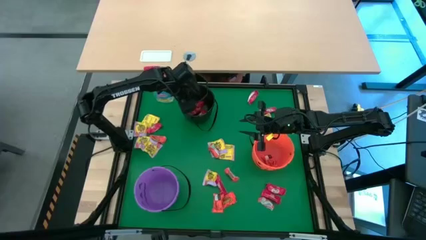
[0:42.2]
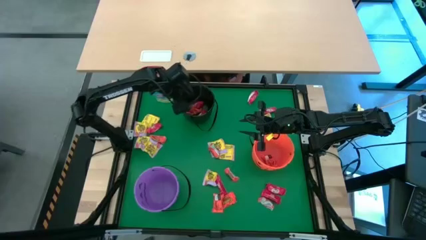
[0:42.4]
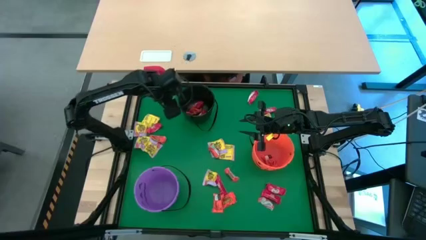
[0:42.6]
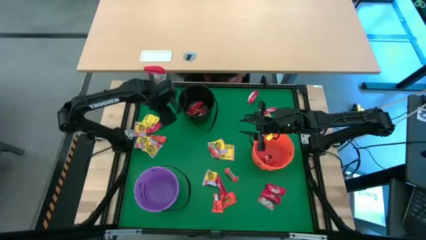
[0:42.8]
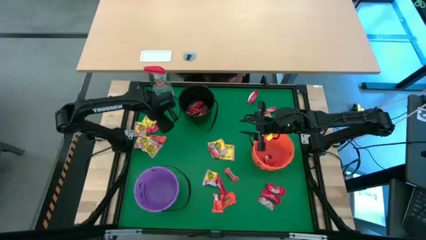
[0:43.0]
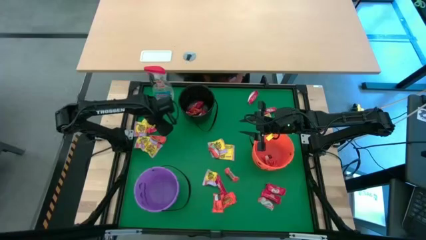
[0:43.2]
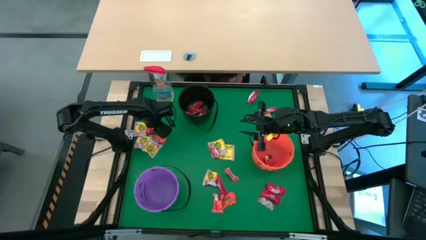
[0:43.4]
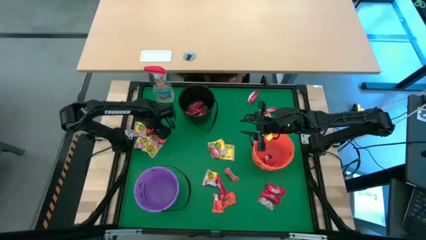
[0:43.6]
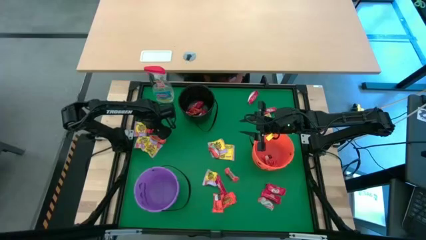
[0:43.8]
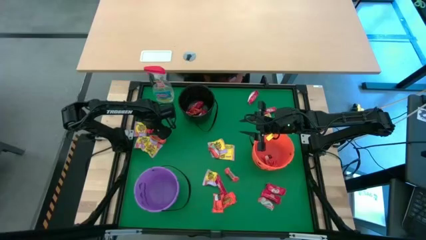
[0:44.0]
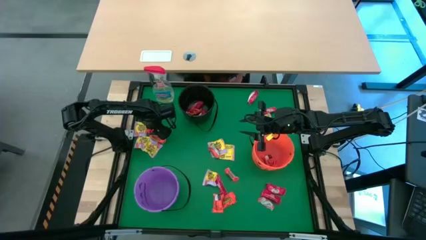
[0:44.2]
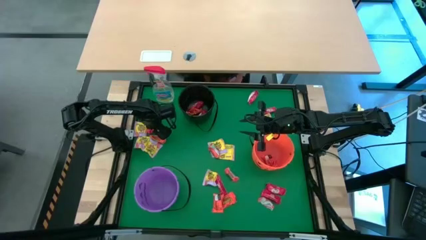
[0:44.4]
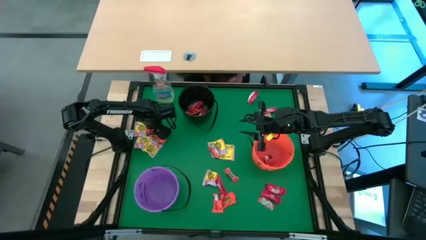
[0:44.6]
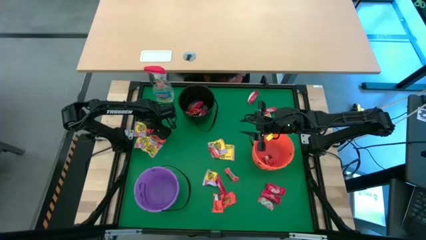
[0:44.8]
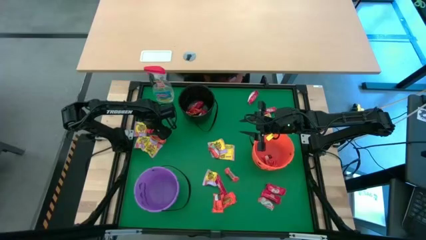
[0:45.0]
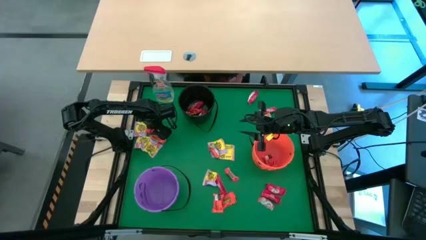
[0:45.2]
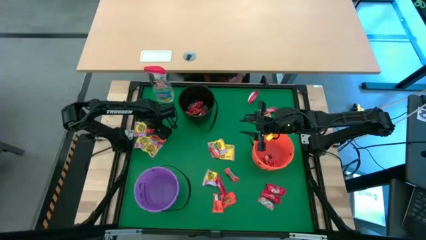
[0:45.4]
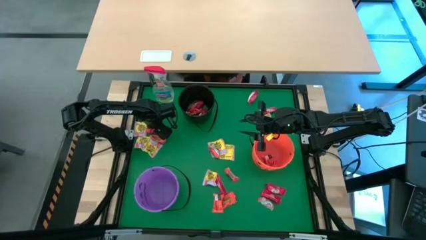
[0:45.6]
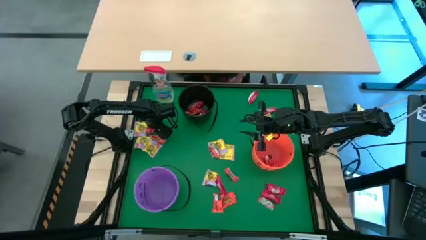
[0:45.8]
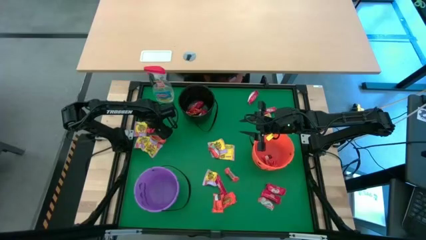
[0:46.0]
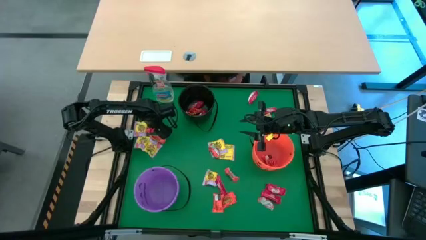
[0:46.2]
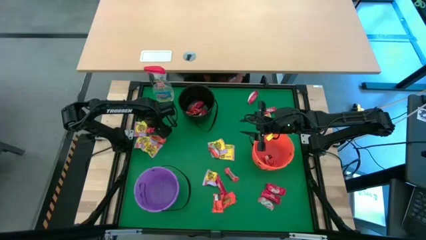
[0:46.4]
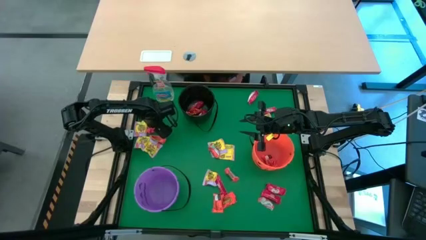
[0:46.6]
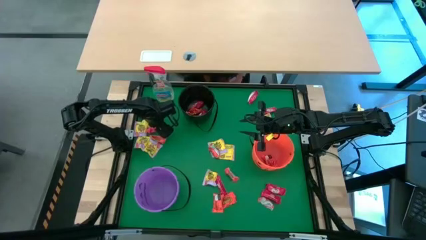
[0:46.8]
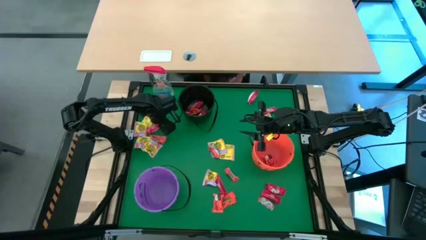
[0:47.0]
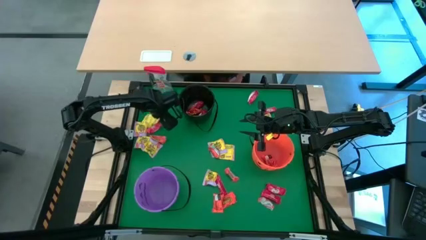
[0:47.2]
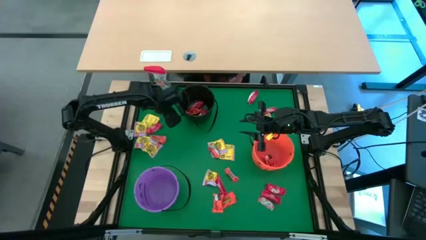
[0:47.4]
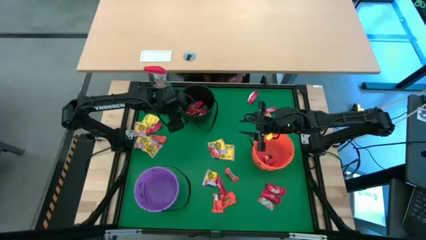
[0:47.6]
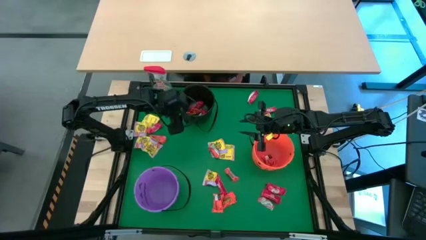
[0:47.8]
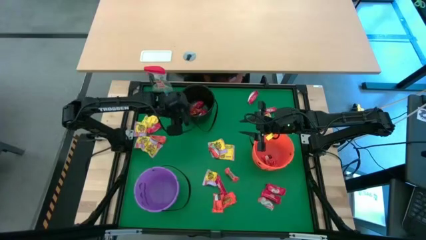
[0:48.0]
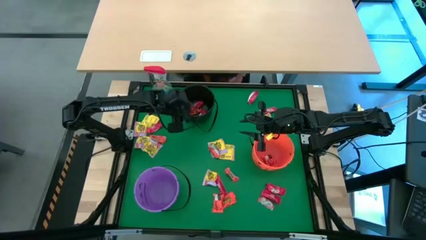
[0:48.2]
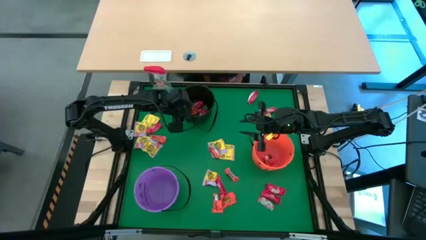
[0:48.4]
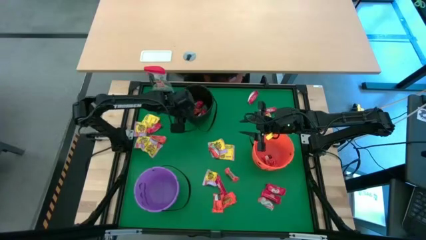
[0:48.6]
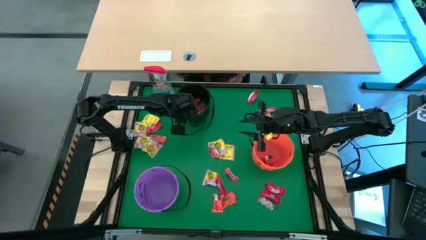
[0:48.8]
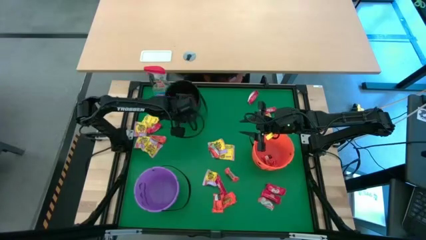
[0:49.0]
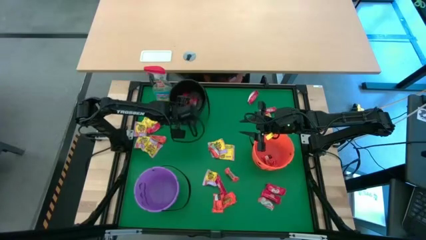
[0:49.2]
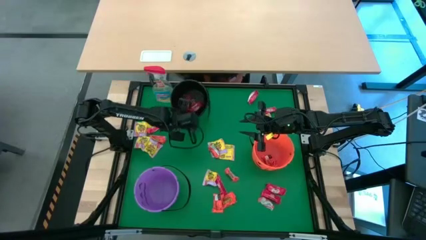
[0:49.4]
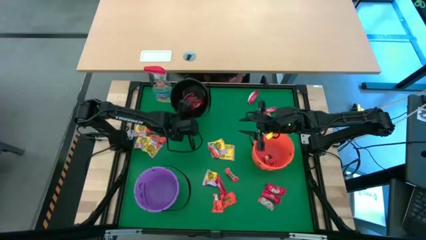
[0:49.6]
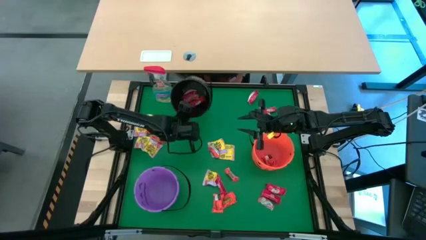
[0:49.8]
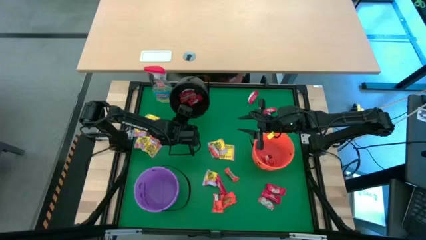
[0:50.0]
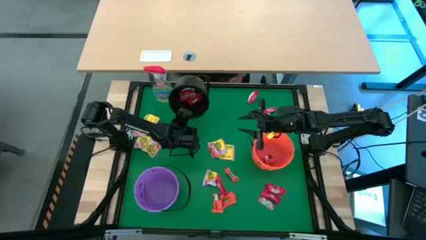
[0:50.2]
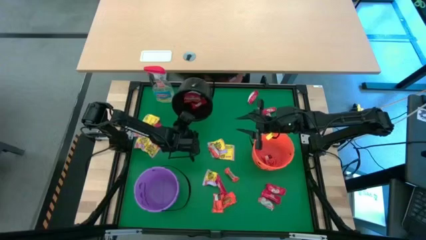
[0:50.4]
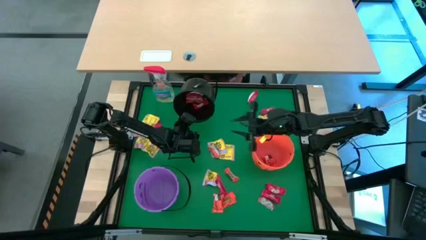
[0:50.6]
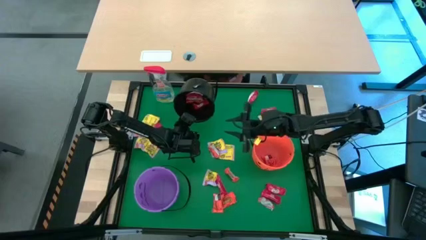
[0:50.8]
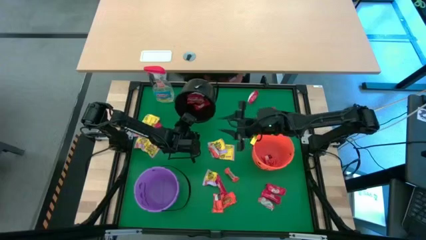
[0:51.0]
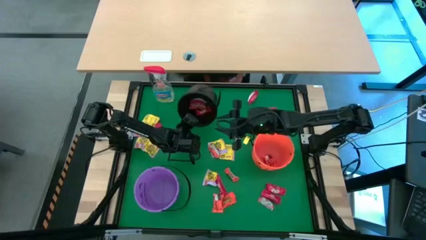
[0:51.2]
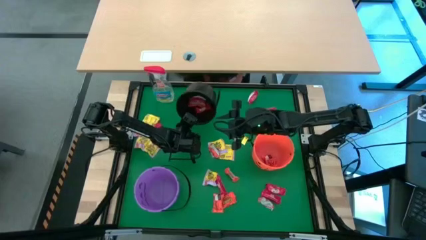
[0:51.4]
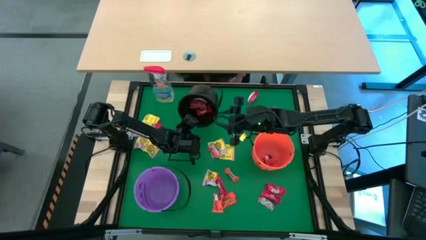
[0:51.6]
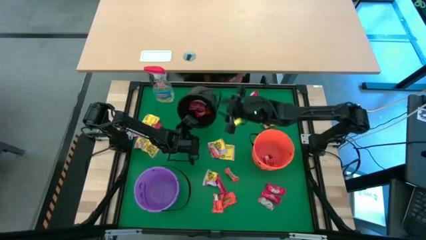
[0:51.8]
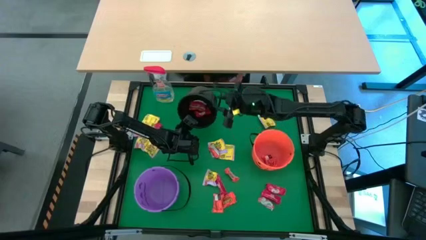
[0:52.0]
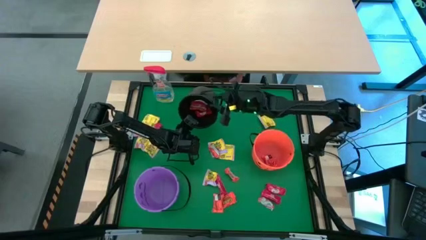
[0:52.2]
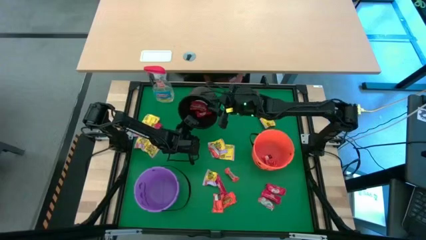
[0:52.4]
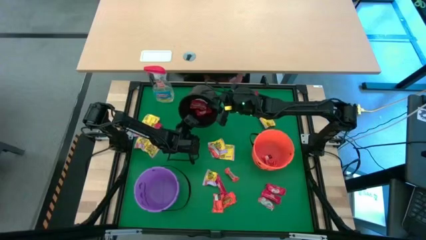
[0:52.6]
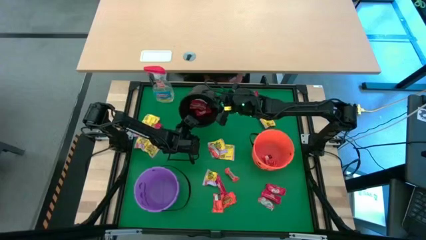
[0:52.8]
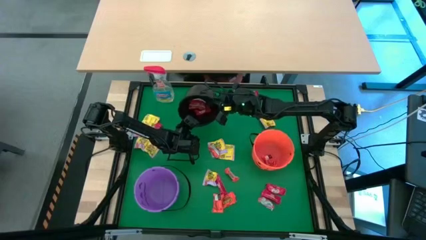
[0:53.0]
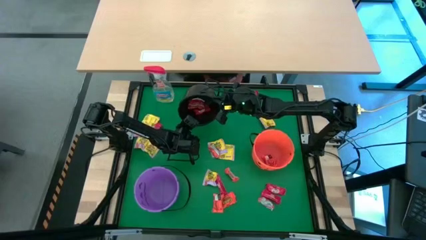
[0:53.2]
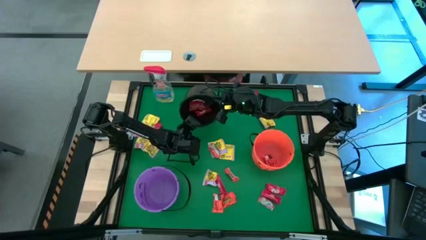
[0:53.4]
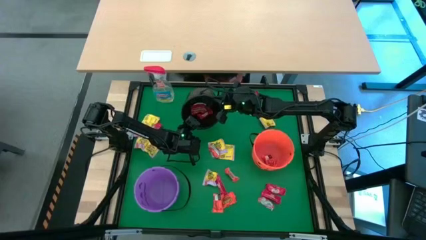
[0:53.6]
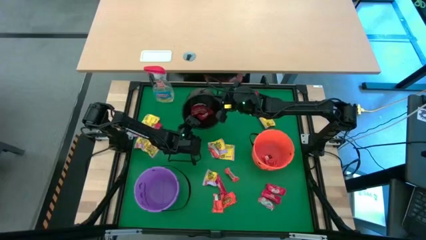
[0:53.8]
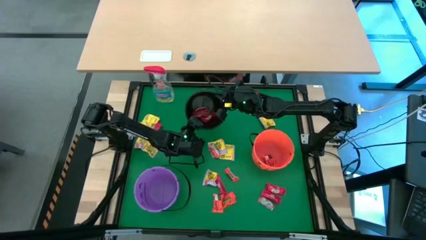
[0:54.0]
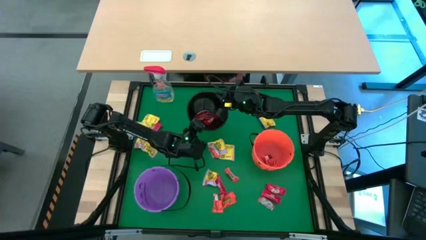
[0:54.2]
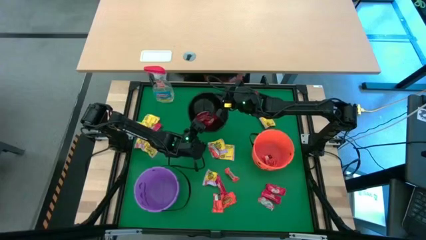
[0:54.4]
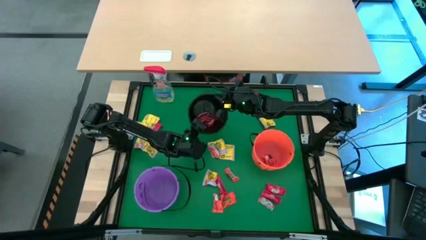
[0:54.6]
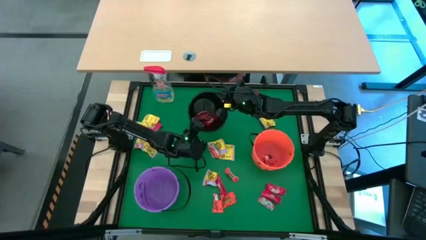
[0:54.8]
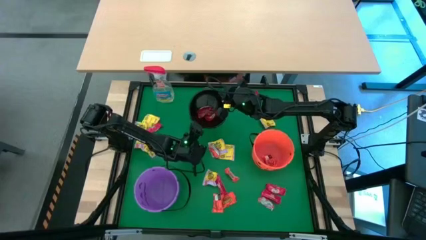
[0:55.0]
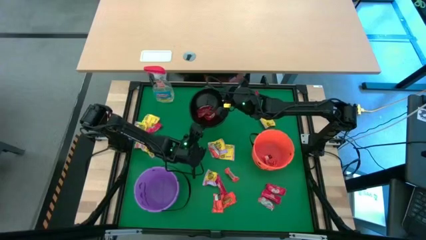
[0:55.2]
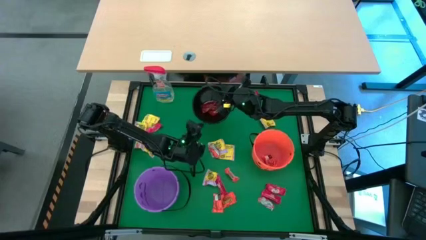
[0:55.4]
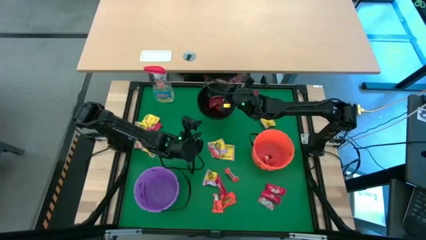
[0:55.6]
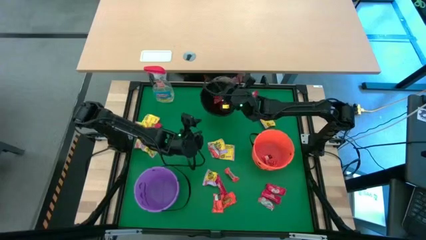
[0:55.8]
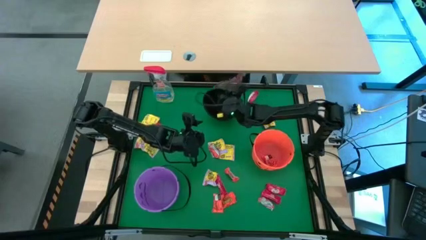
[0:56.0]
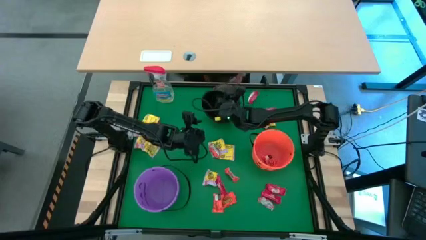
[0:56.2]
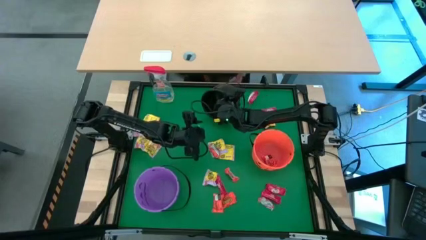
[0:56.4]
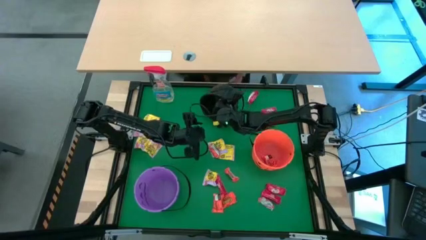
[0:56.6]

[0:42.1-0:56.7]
Task: Sort candy
Remove the orange candy from the black bucket

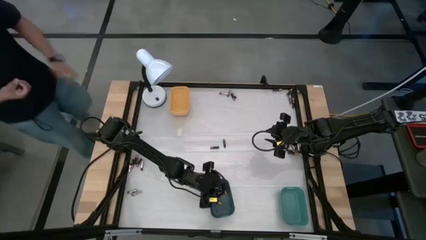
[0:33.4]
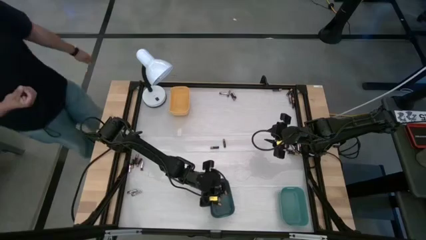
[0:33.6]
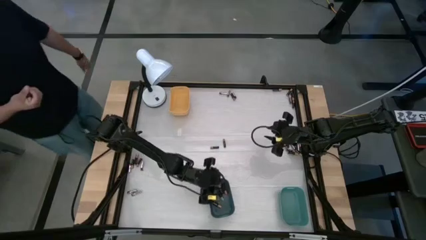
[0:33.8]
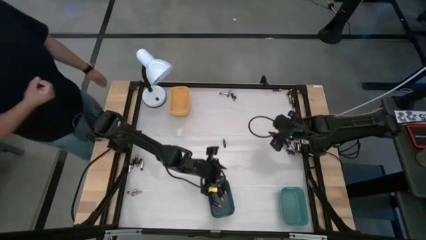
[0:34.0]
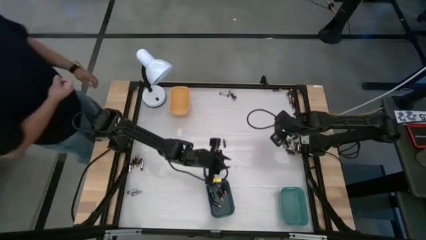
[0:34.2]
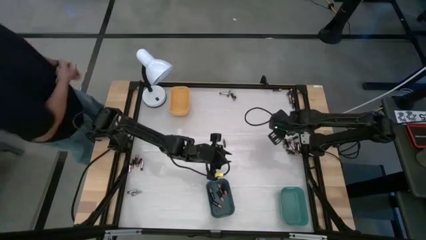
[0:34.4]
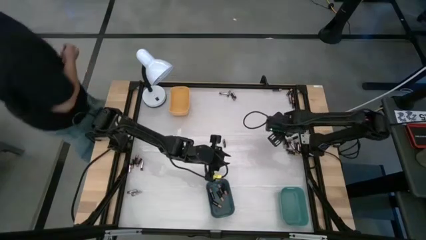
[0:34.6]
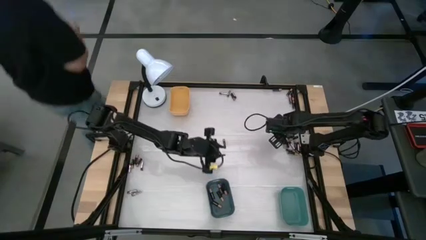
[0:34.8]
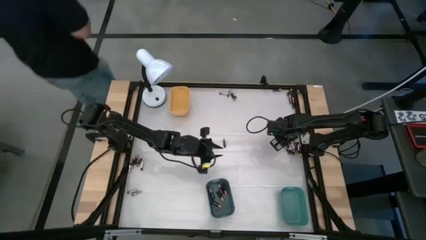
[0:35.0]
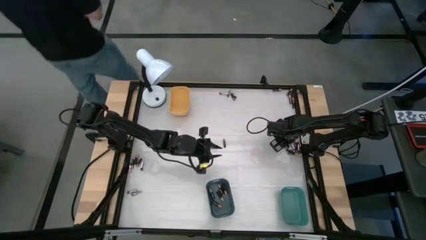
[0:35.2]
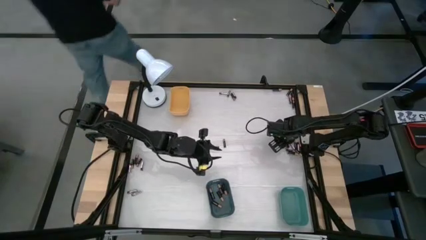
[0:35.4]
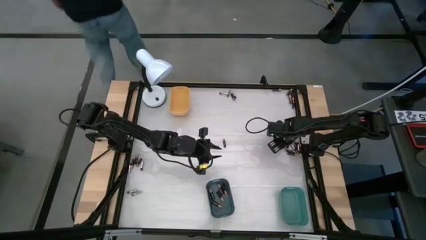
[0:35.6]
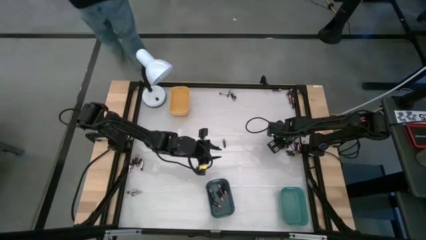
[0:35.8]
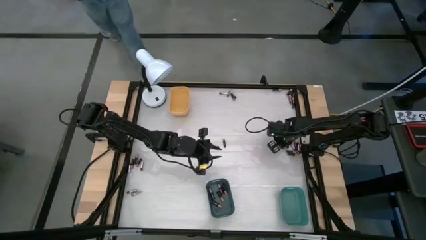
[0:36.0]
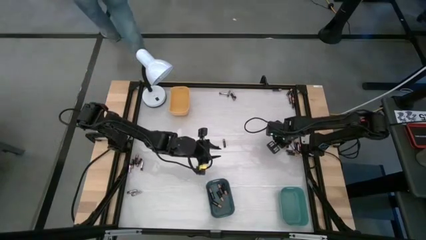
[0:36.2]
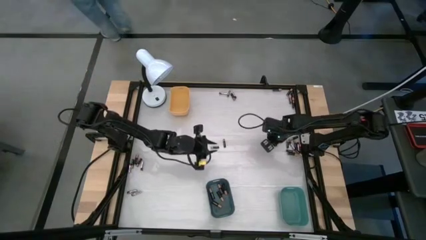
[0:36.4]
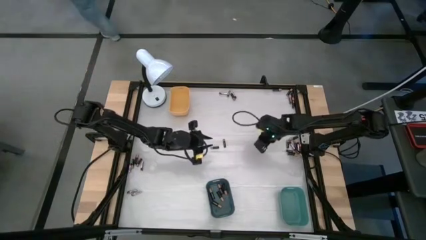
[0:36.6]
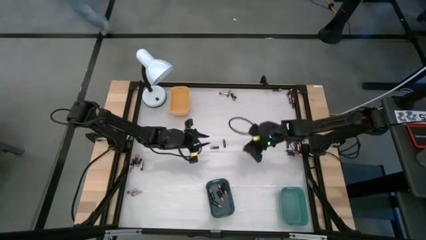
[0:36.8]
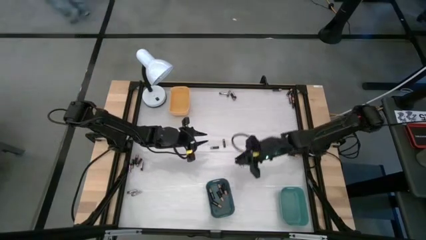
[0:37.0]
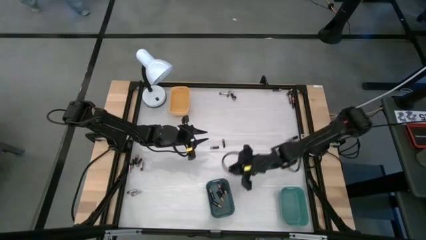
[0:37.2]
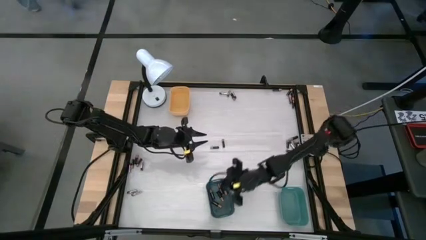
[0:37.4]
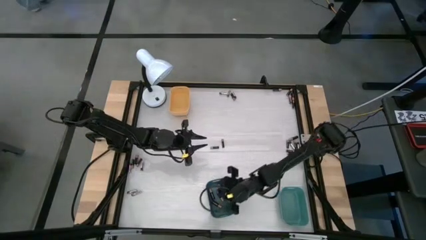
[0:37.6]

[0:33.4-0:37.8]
Task: Sort batteries
Put the black battery into the blue bin
